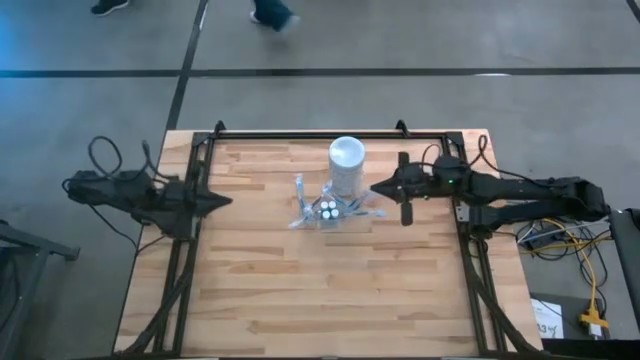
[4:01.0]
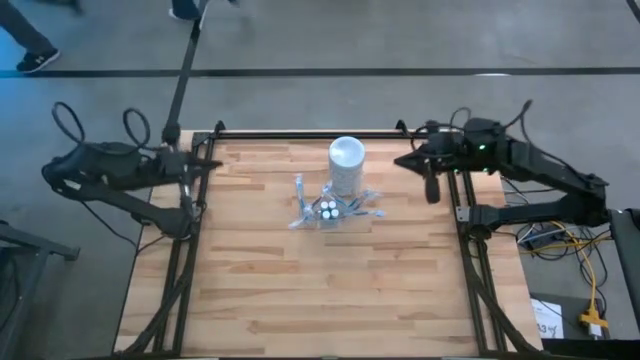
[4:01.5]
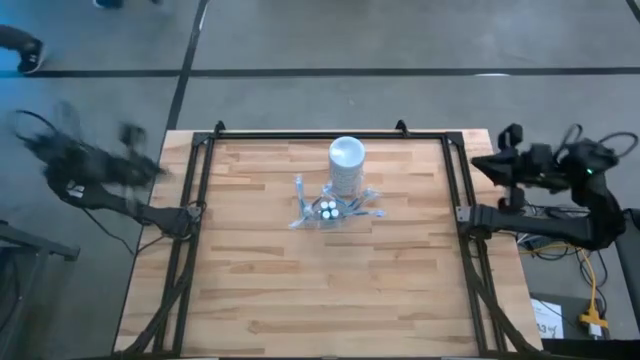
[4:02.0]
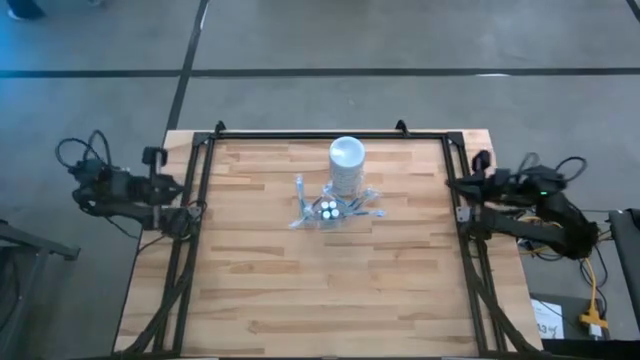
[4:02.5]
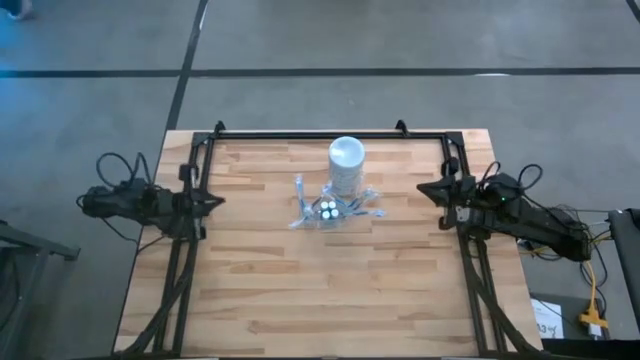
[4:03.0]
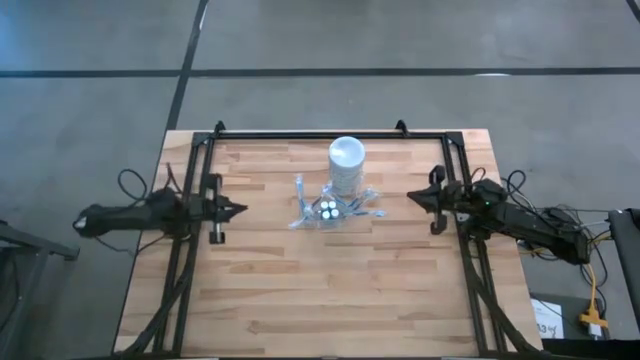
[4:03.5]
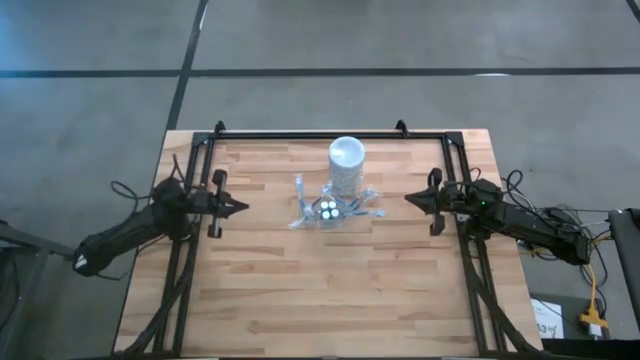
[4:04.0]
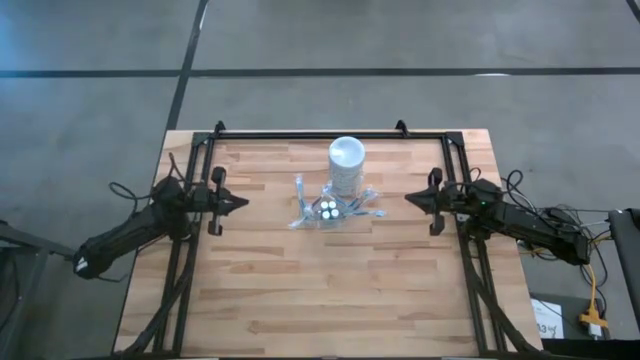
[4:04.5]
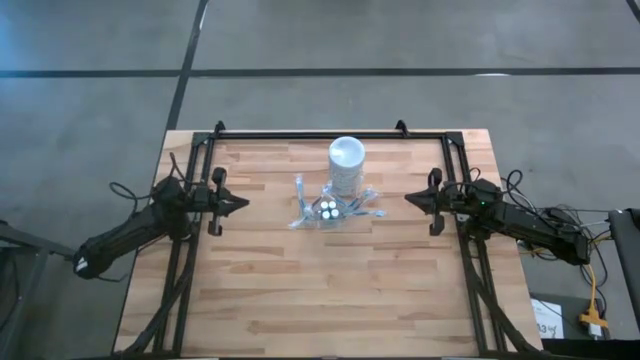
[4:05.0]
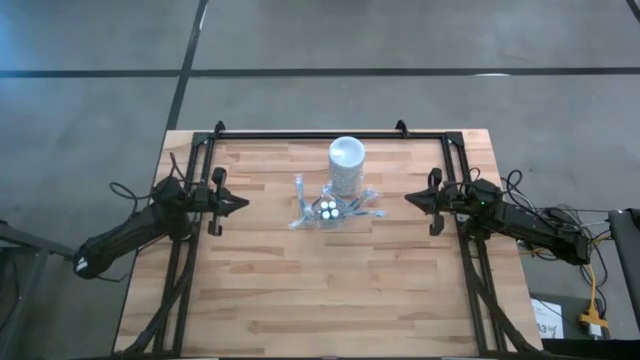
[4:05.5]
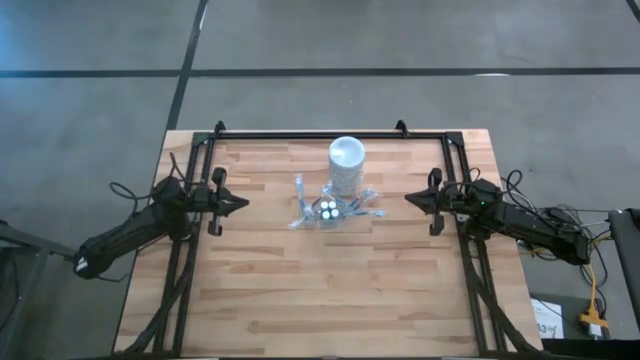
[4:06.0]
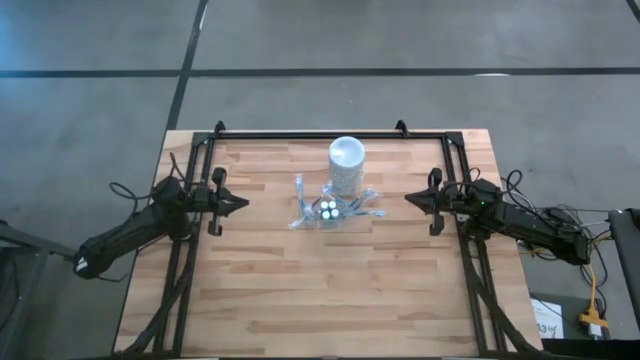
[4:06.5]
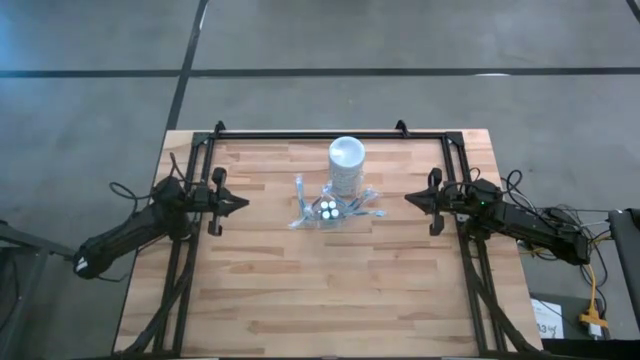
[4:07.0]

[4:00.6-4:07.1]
Task: Pick & Place toothbrushing station
Return to Home Position

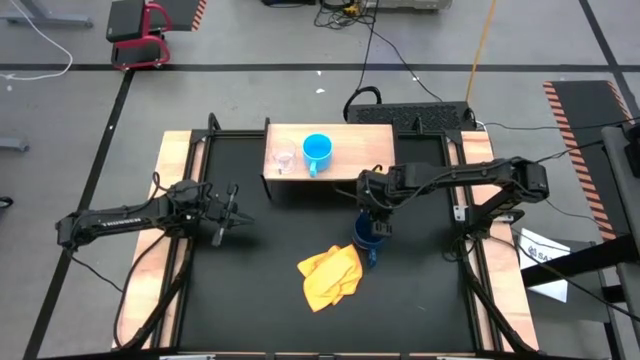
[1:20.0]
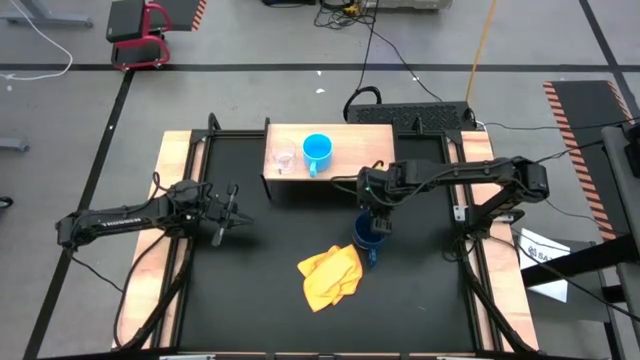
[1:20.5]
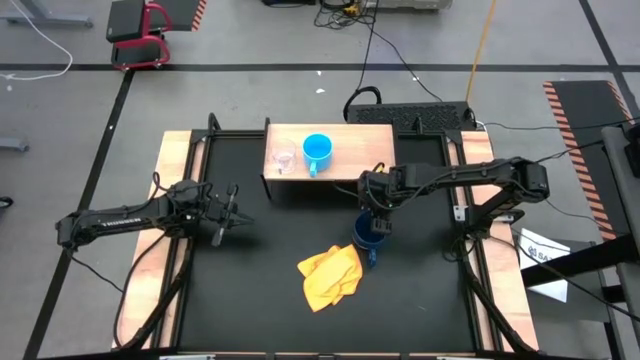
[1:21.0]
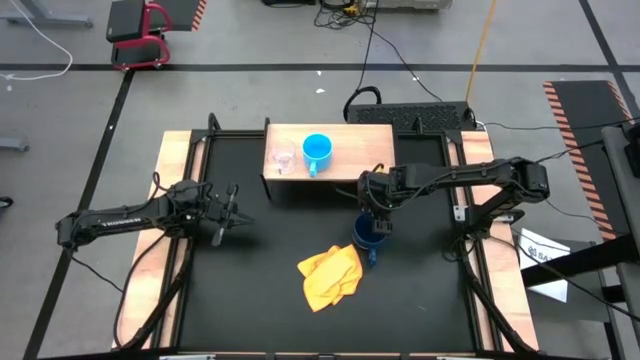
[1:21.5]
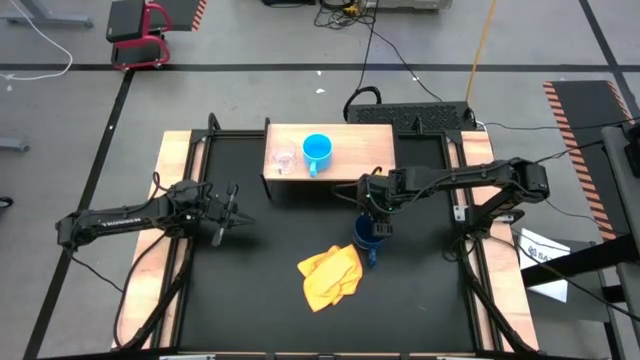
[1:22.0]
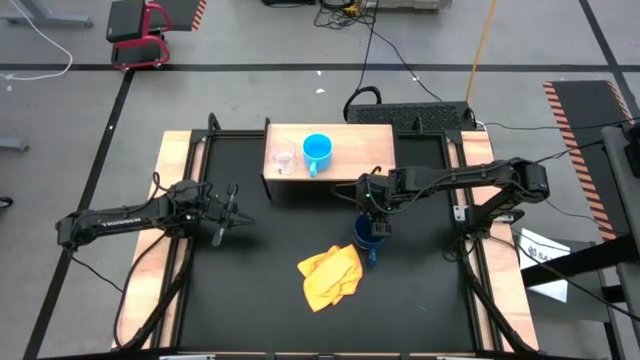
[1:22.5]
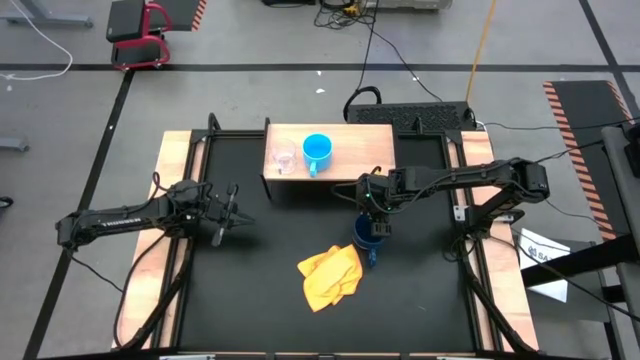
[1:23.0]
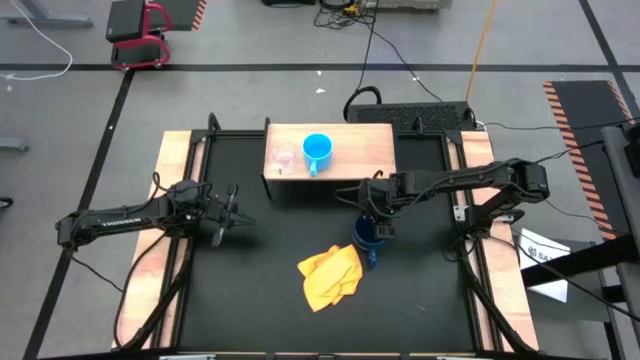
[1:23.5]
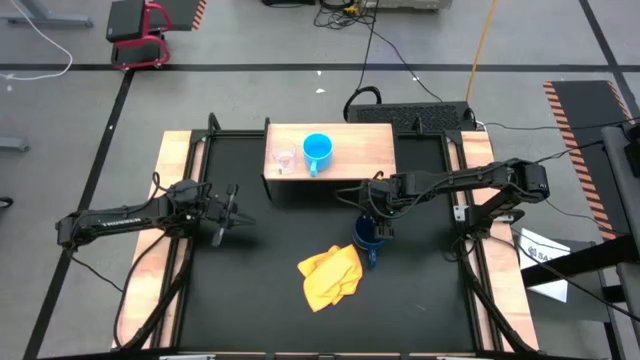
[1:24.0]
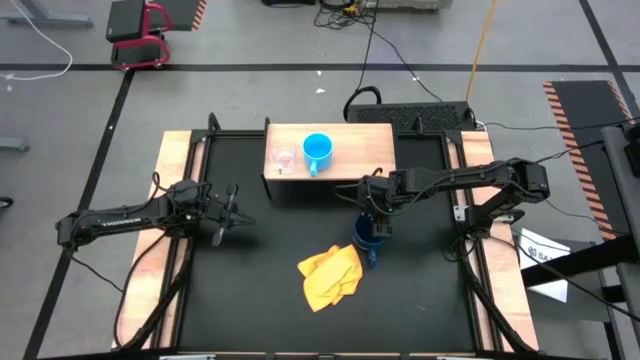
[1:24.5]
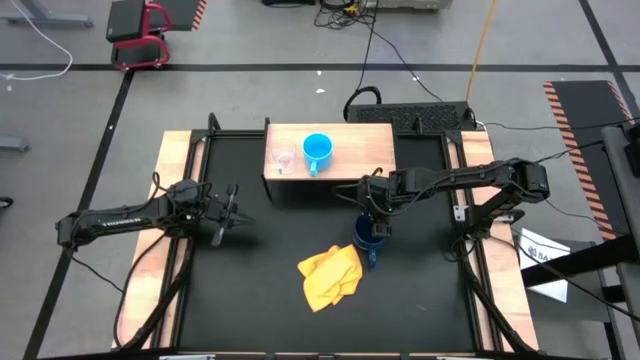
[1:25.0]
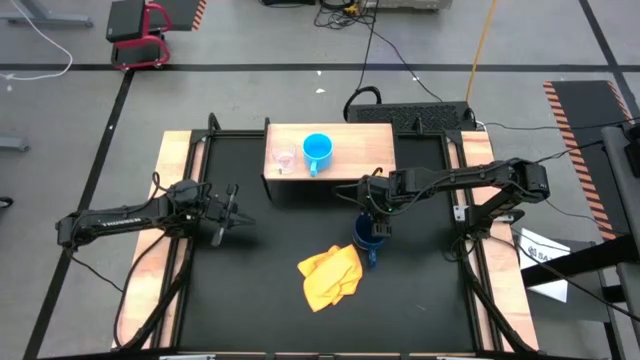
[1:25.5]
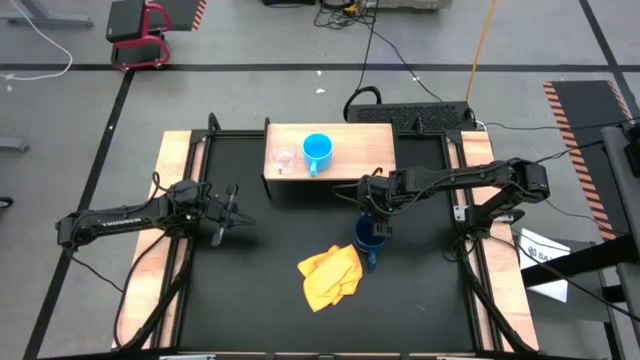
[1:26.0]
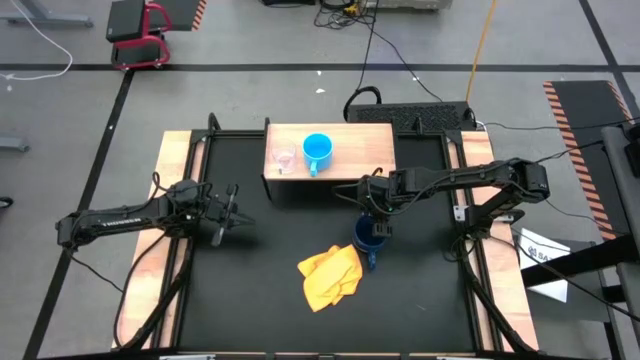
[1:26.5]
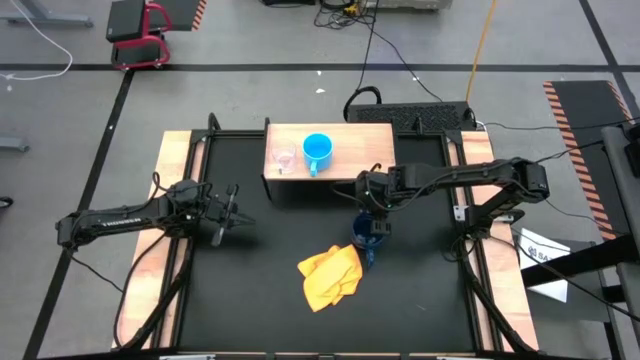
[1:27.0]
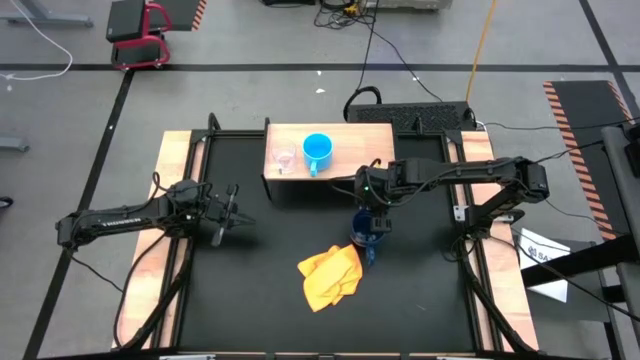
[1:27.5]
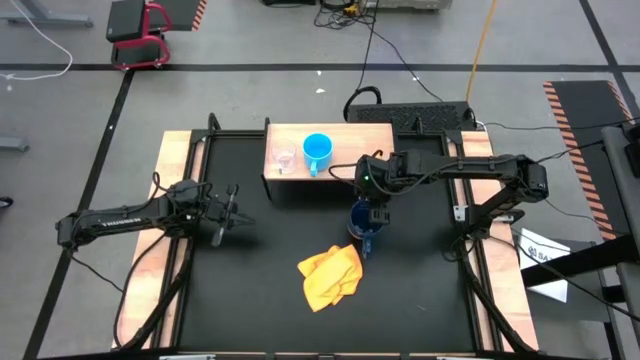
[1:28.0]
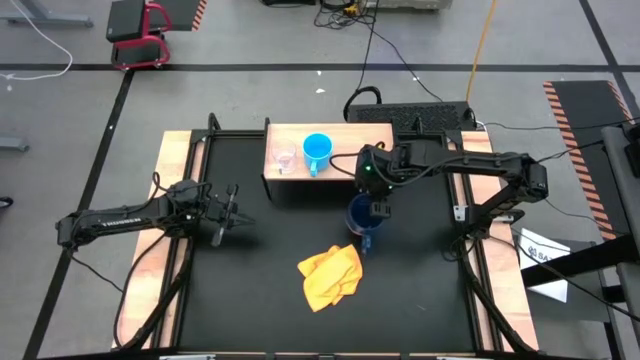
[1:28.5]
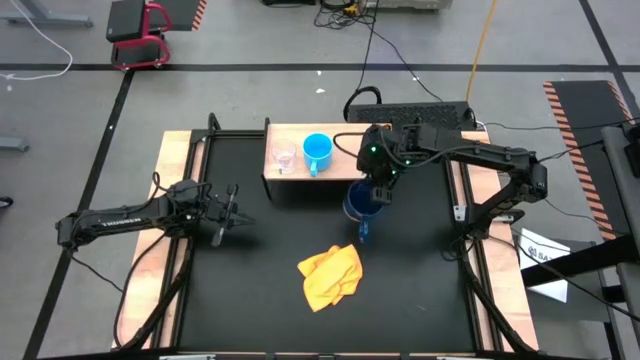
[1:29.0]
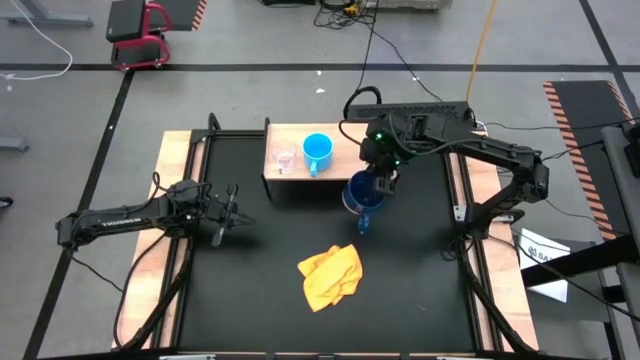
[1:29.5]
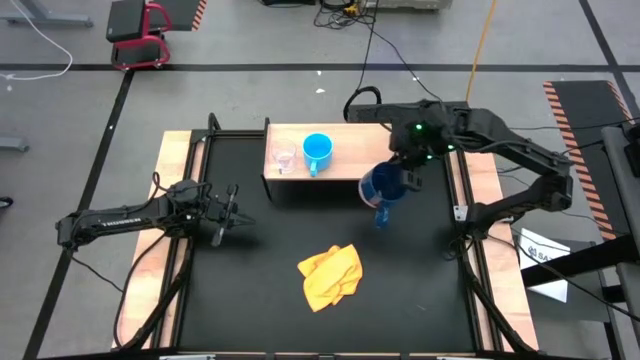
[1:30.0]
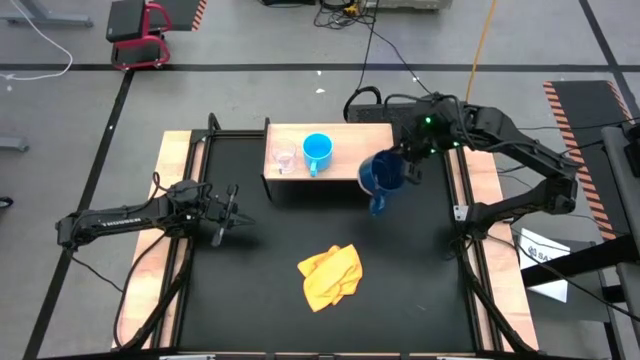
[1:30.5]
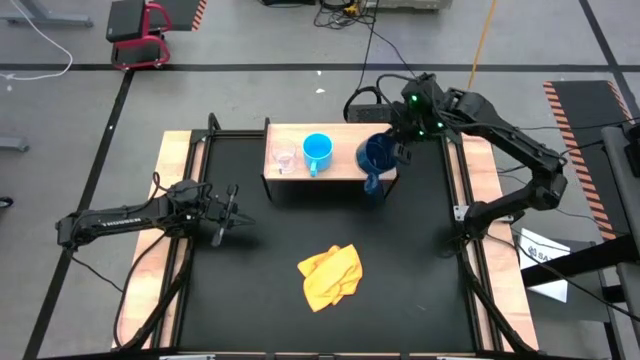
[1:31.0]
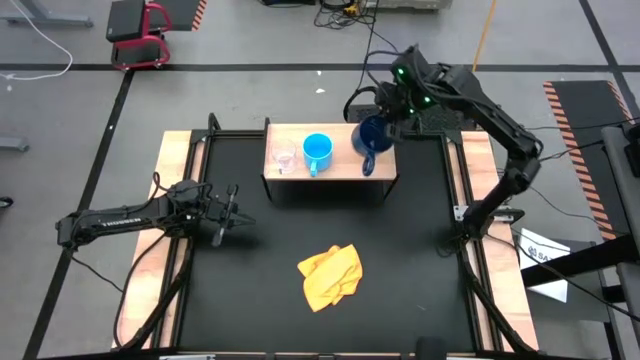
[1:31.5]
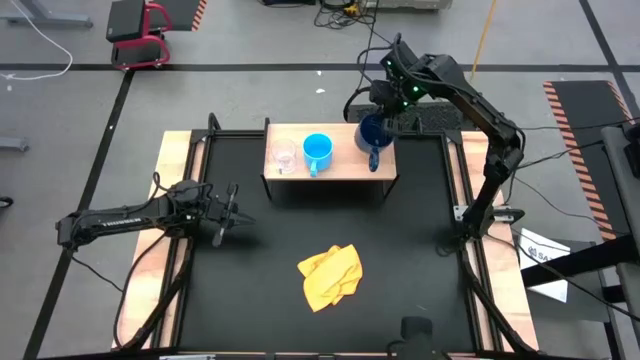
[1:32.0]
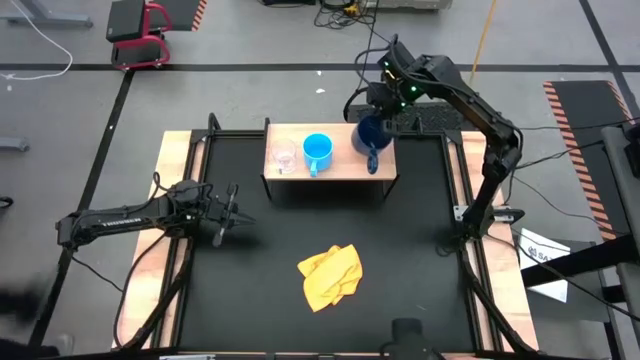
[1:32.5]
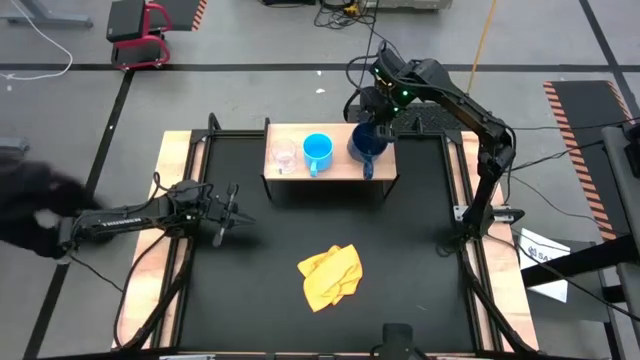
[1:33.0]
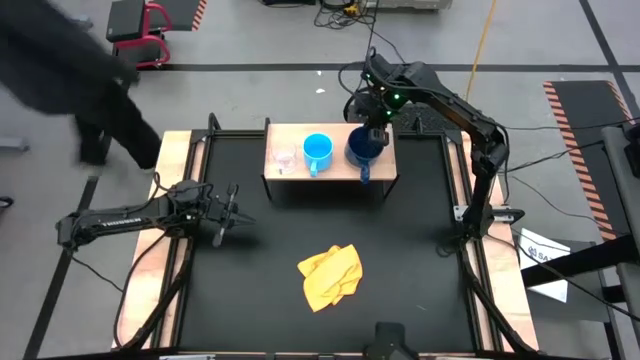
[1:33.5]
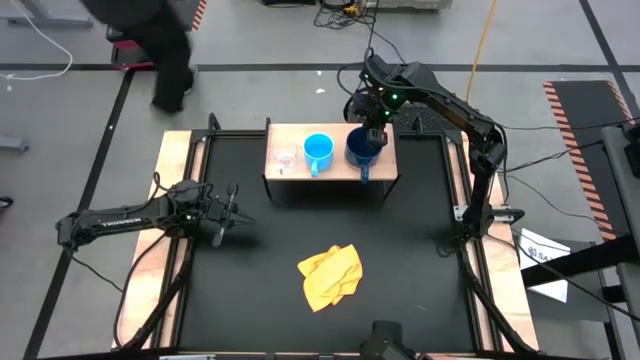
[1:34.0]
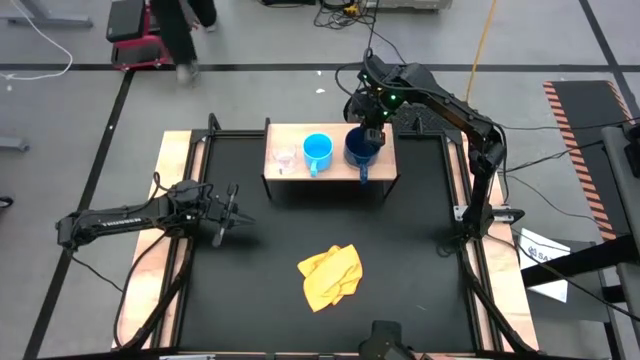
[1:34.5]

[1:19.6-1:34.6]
Task: Stack small to large cups/mugs on shelf
Put the dark blue mug on the shelf
